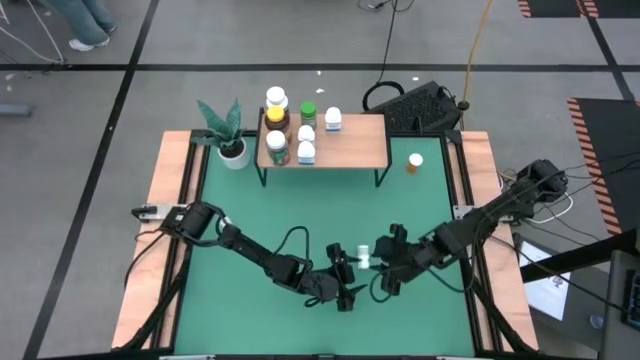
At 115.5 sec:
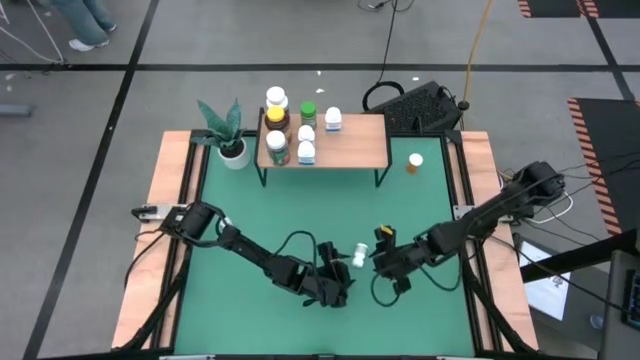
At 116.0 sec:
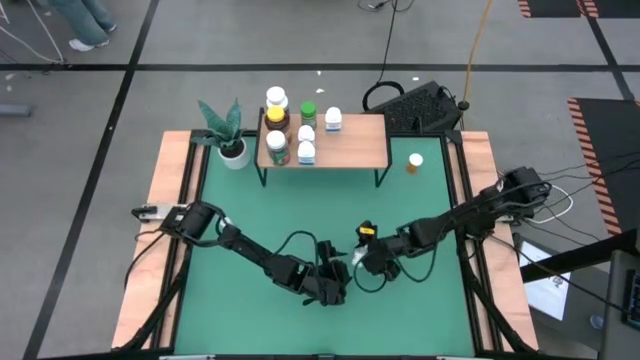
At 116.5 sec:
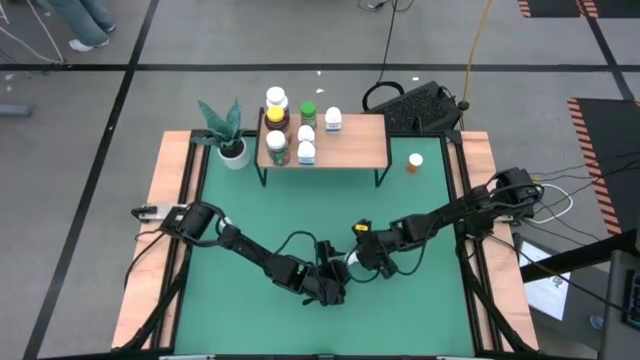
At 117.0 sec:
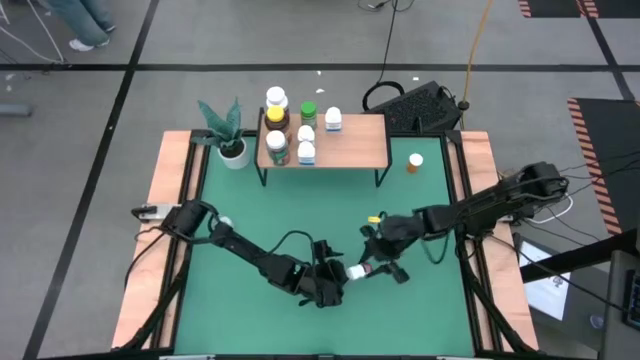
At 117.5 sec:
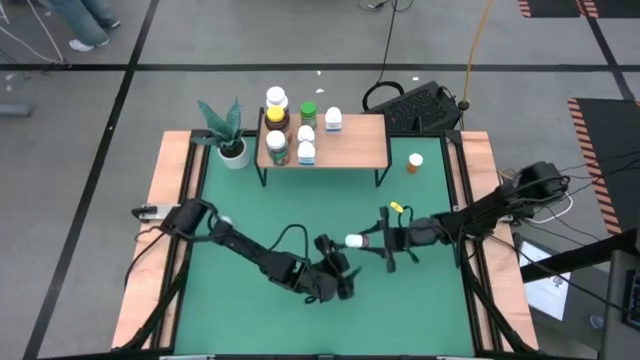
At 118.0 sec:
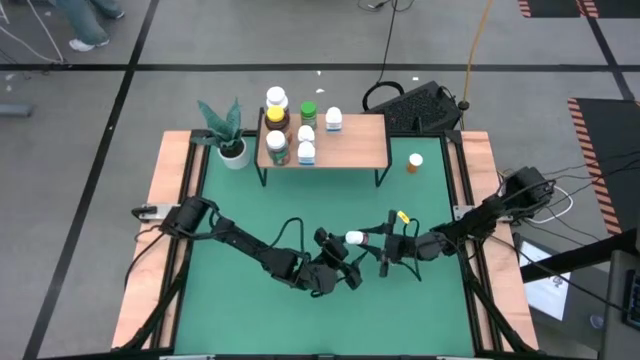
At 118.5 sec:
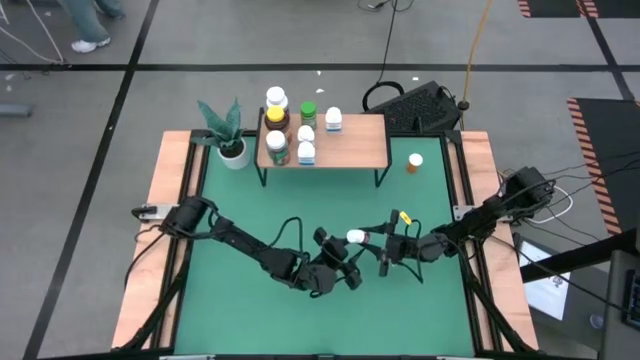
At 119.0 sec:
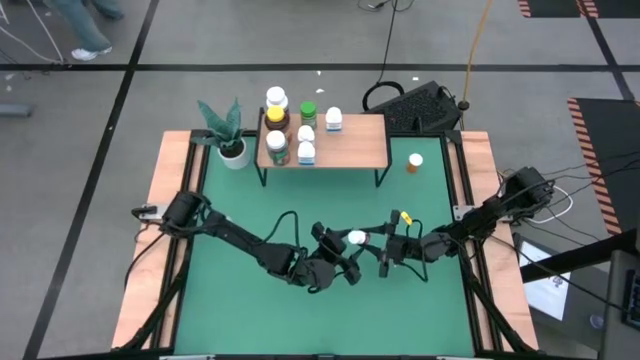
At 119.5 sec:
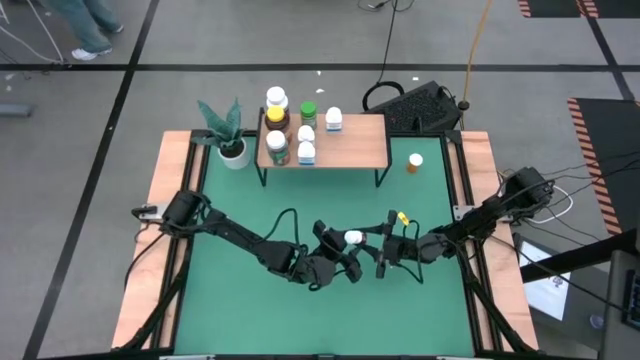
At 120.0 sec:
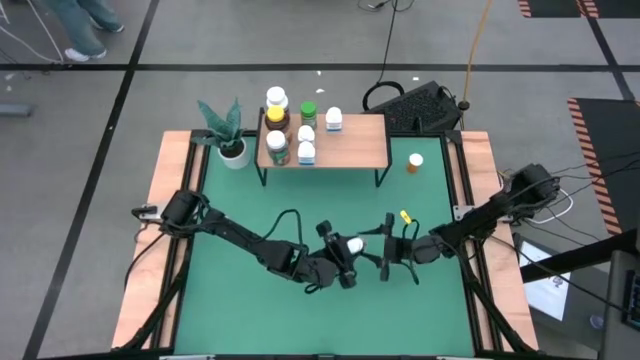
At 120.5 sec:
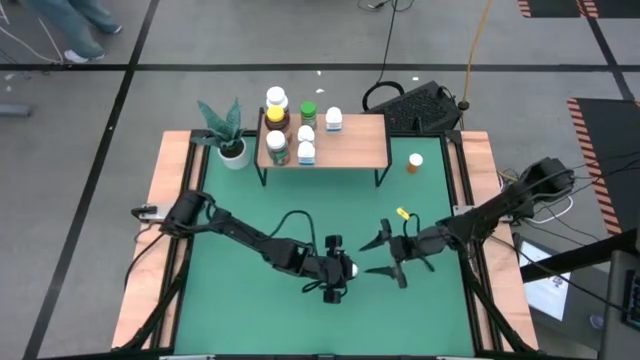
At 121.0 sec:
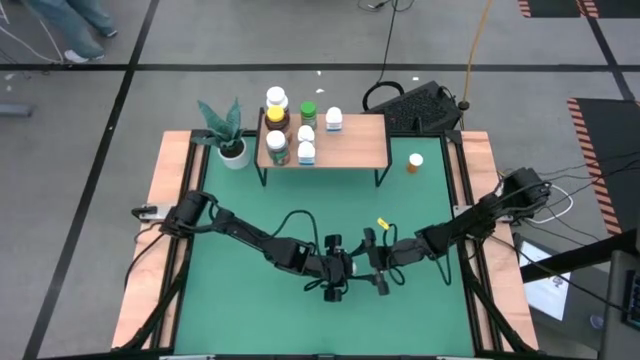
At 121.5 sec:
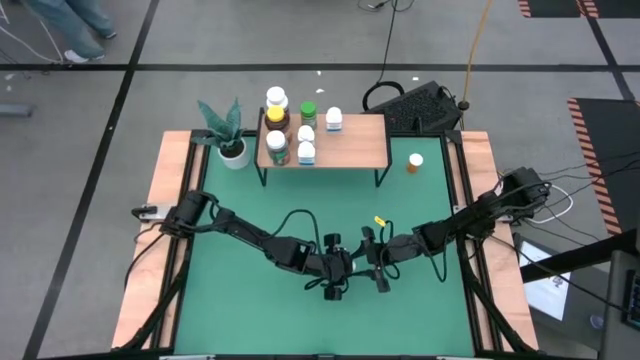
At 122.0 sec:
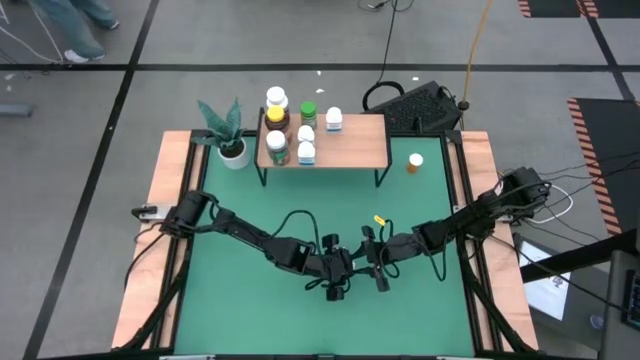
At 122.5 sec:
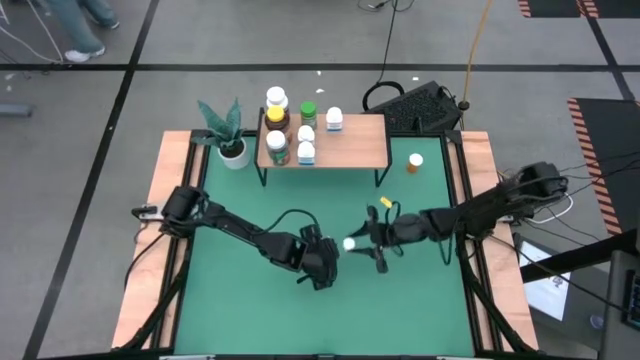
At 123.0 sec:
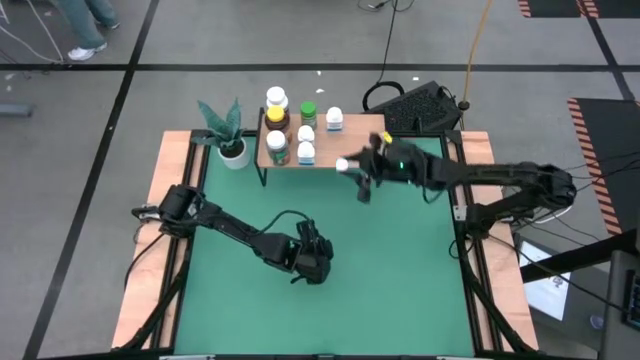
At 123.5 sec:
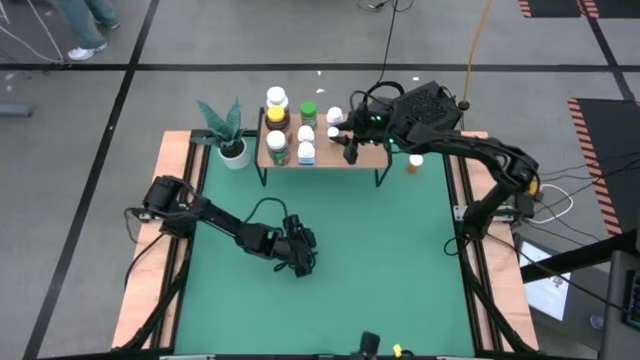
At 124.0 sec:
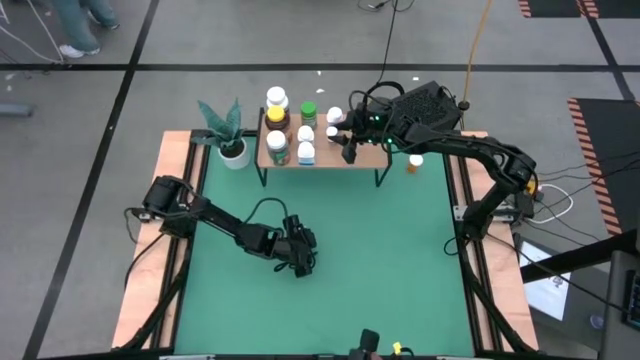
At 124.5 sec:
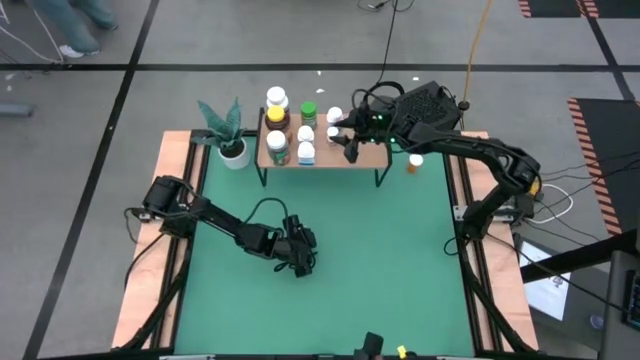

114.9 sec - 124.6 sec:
Task: Pick and place medicine bottles onto shelf by color
Put the white black pill bottle on the shelf aligned with the white blue pill bottle

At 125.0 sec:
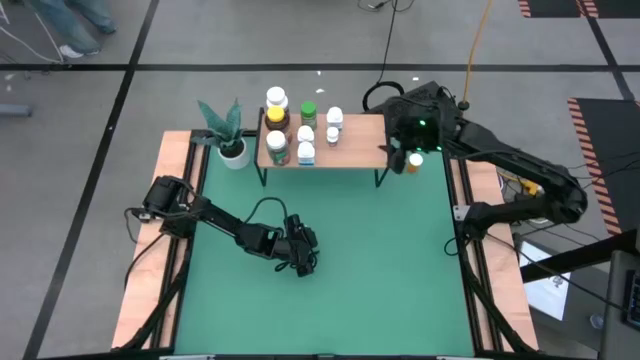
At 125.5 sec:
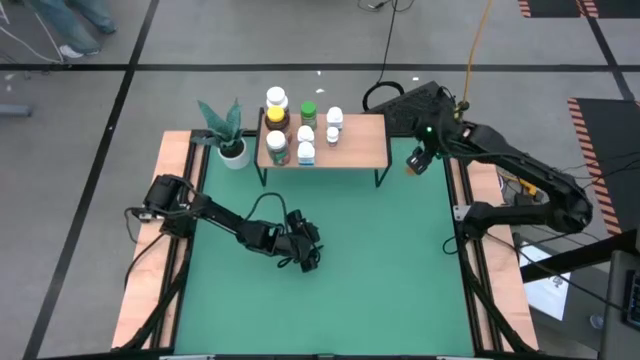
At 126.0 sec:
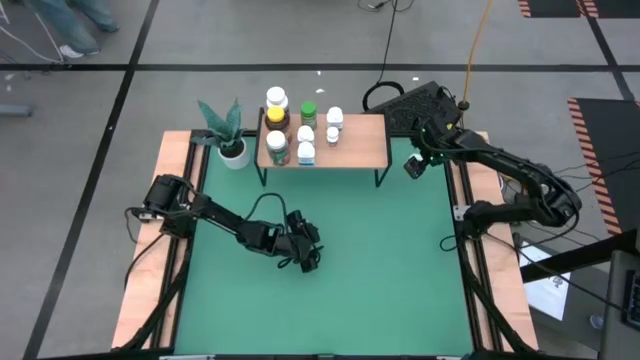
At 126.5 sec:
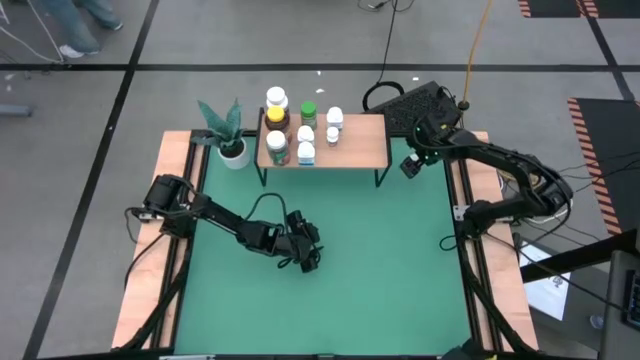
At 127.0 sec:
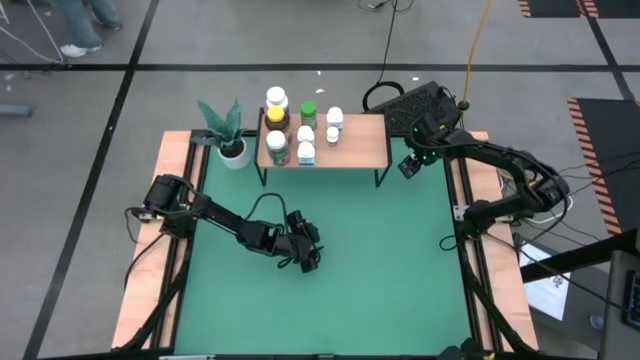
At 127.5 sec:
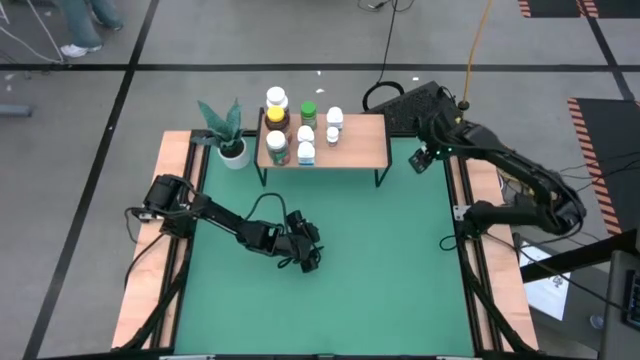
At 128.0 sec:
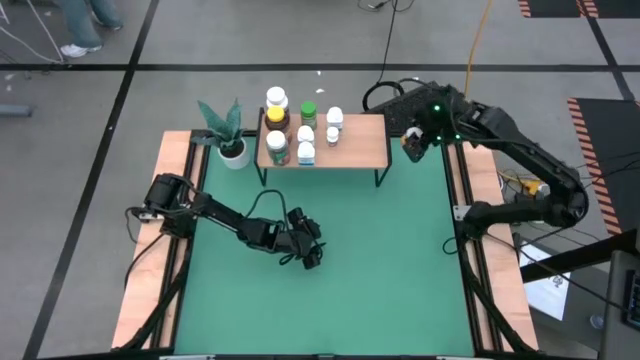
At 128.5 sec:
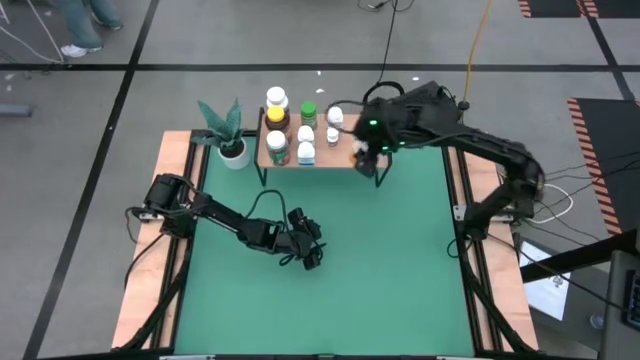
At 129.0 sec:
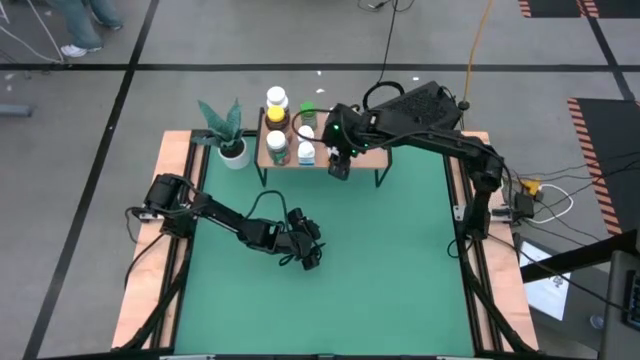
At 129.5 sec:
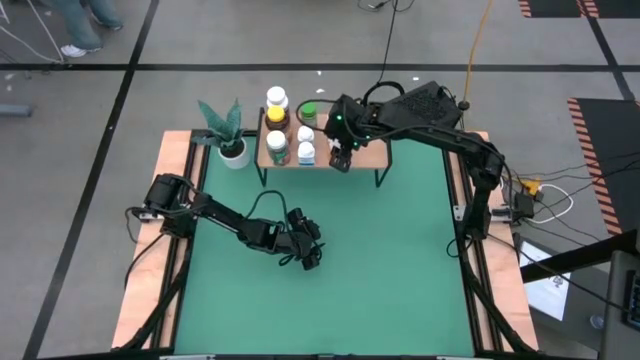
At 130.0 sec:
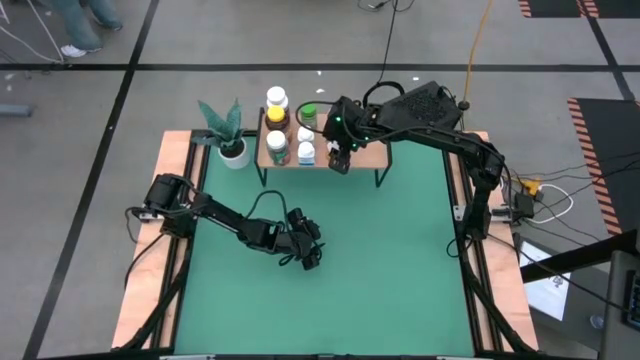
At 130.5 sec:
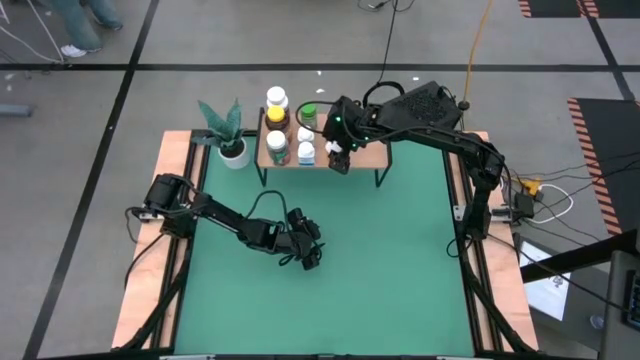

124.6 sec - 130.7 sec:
Put the white orange pill bottle on the shelf aligned with white black pill bottle

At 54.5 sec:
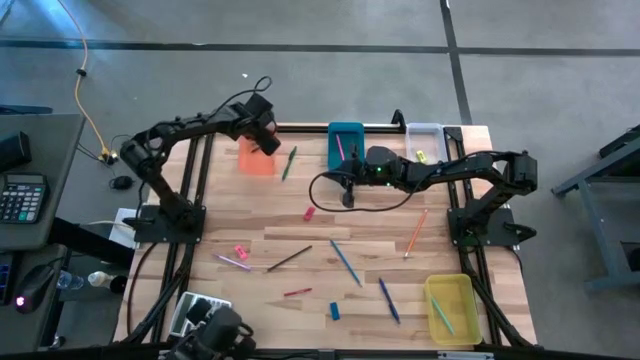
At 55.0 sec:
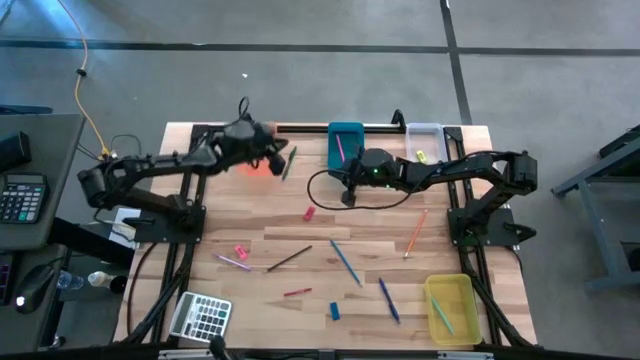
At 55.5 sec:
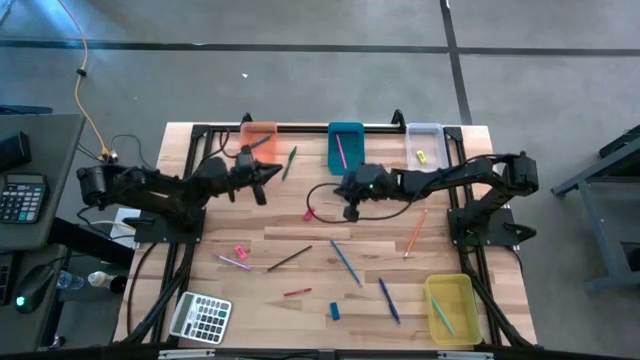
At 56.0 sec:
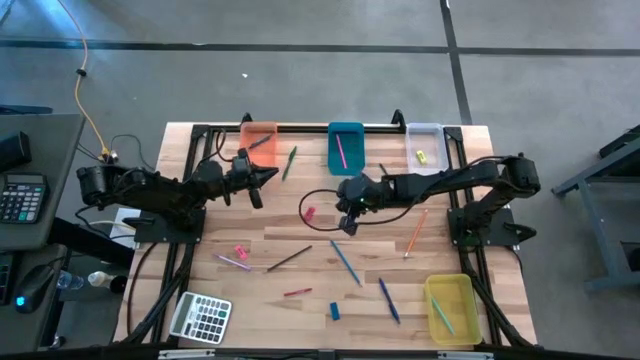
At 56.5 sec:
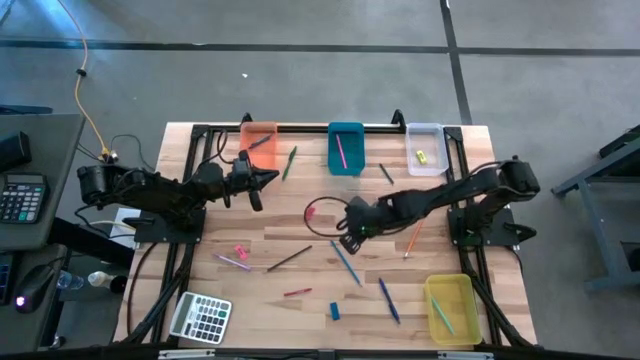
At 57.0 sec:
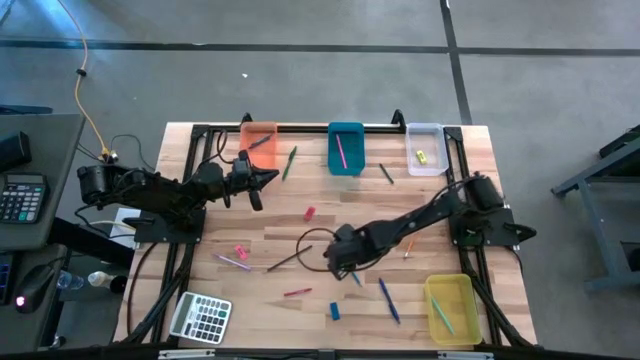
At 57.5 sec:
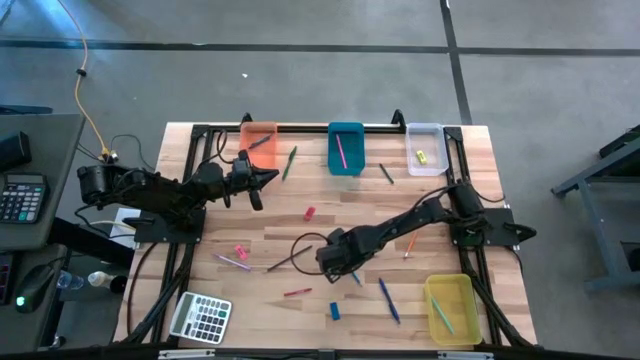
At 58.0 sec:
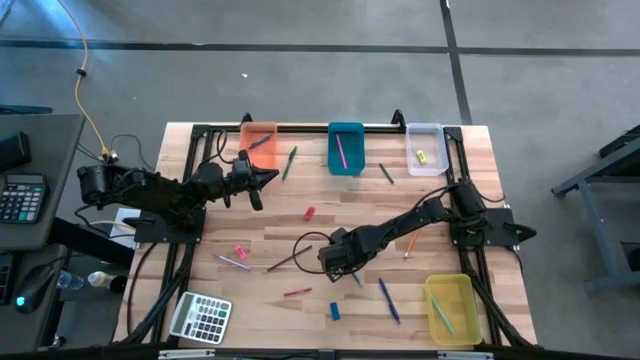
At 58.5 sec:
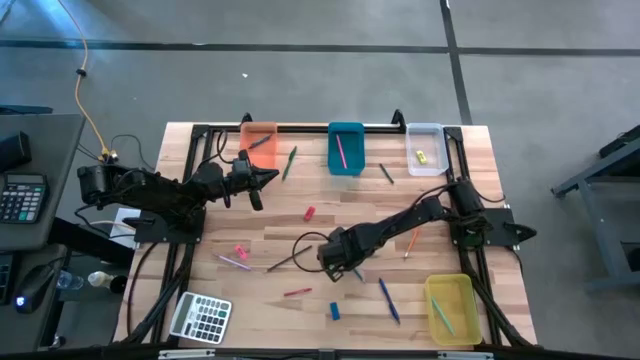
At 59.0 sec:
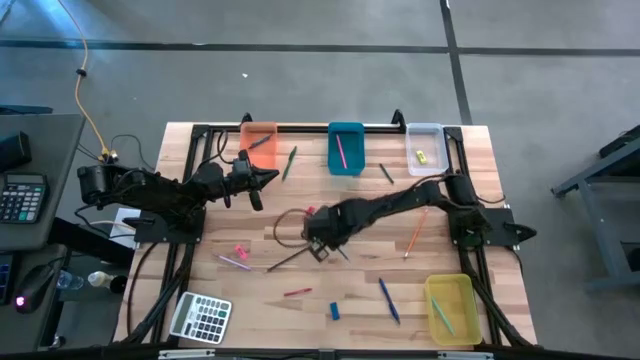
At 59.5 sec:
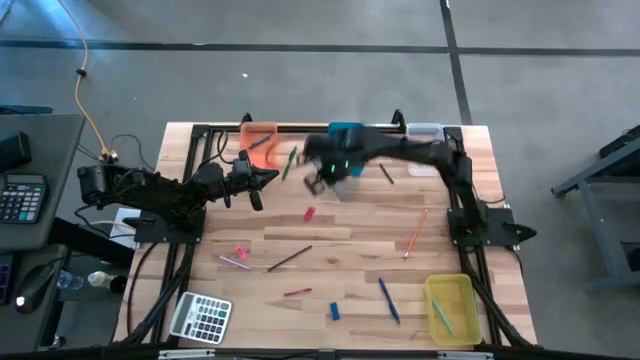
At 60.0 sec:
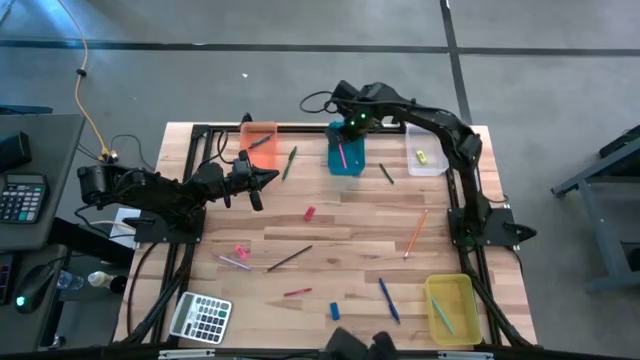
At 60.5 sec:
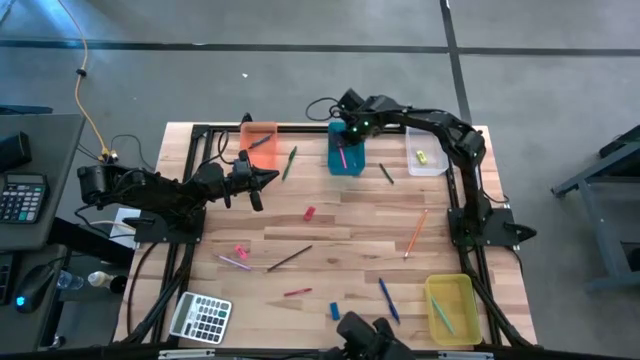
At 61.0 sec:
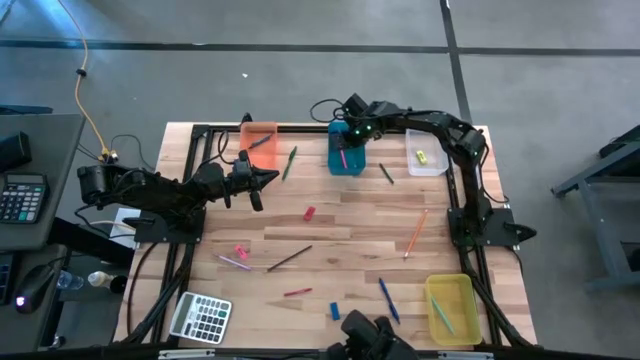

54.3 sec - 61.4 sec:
Task: Sort crayons/erasers/pens/pencils in bins
Put the blue pencil into the blue bin
